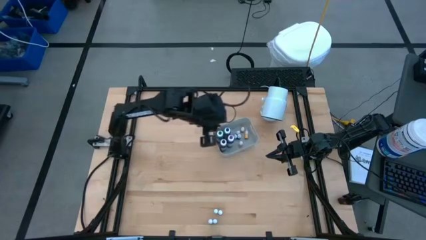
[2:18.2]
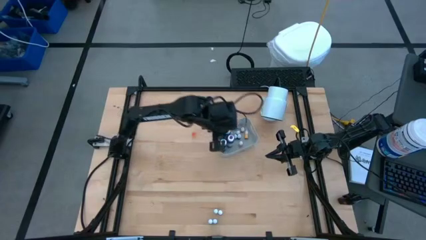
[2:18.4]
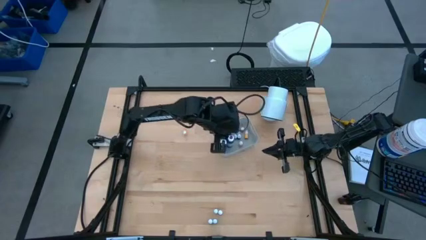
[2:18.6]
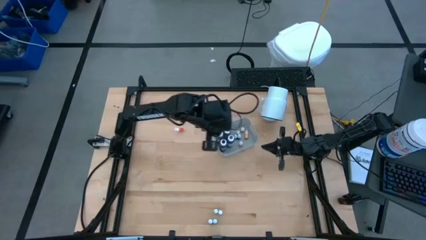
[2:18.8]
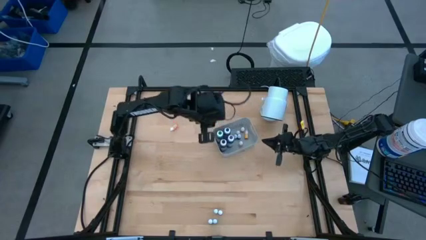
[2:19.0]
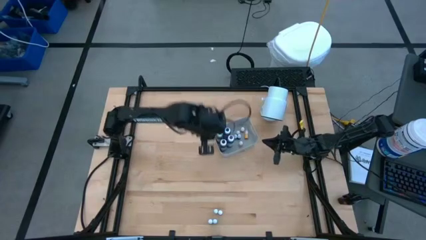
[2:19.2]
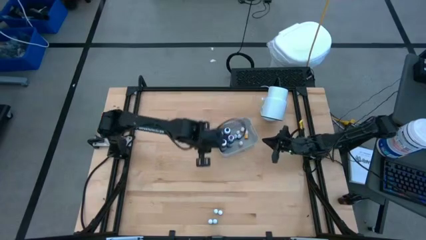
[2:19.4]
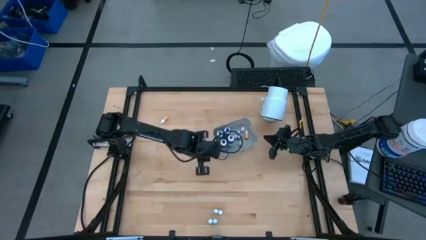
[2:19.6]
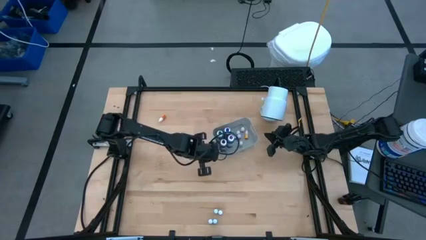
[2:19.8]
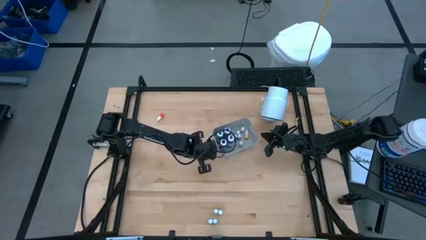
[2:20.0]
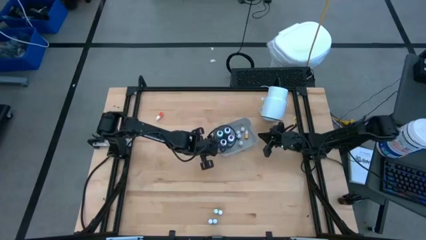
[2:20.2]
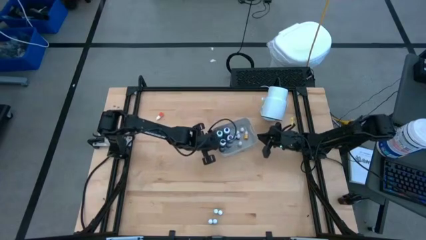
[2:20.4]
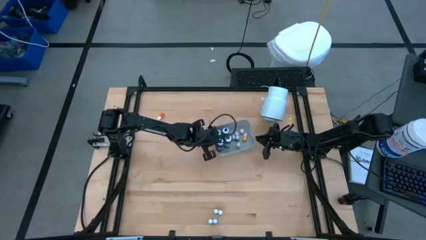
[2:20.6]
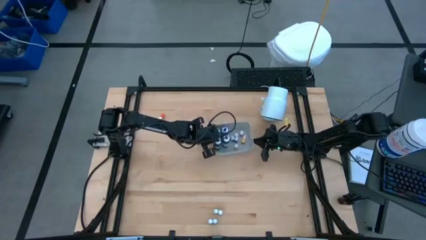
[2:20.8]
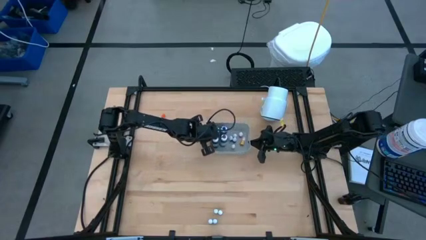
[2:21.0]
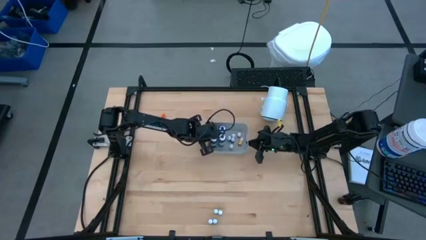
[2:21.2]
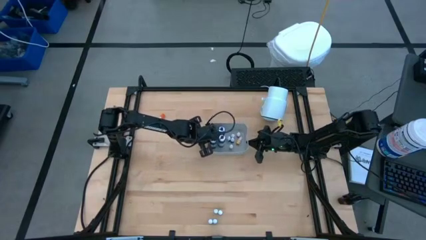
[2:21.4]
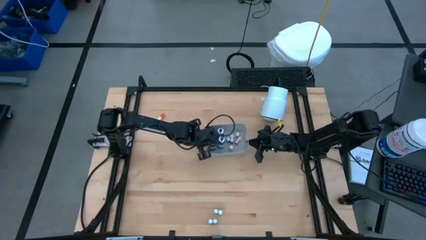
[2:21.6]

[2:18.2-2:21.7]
Task: Pick & Place food coloring
Adjust the gray bin

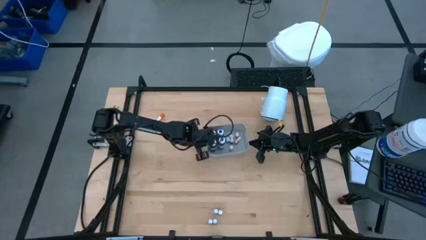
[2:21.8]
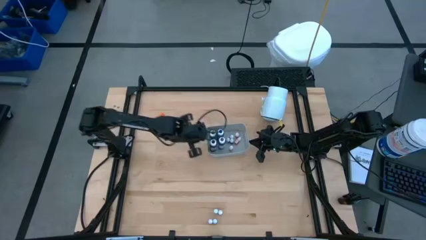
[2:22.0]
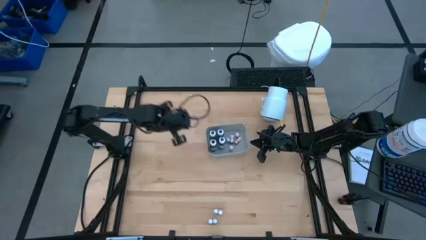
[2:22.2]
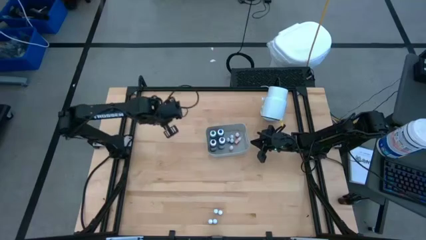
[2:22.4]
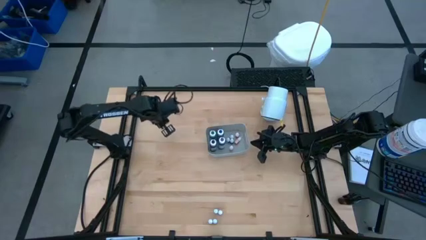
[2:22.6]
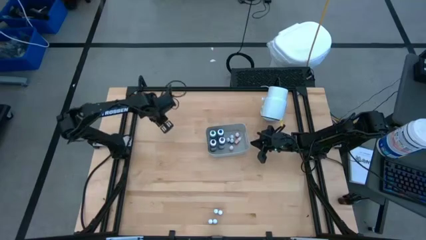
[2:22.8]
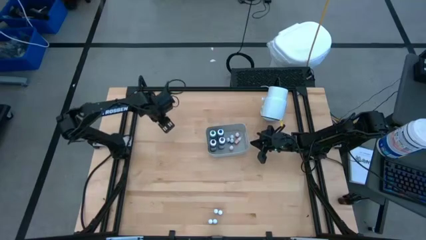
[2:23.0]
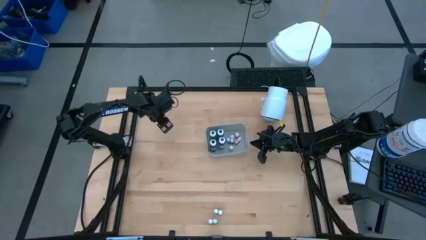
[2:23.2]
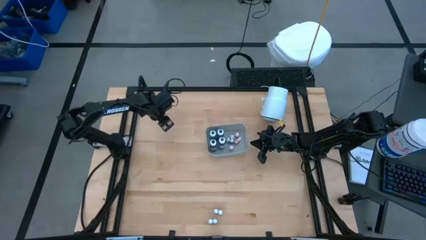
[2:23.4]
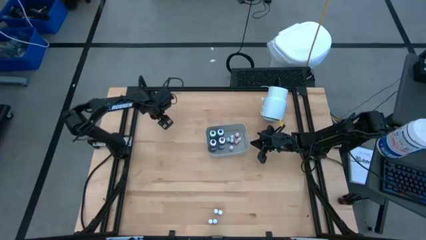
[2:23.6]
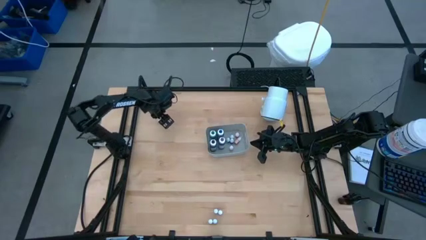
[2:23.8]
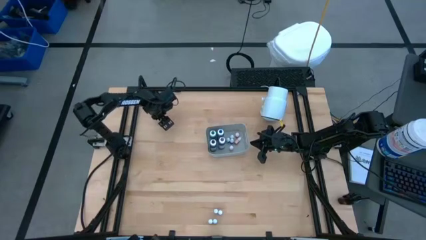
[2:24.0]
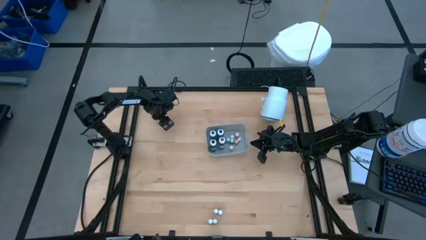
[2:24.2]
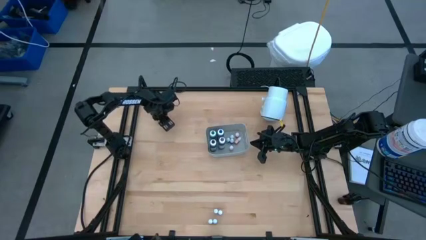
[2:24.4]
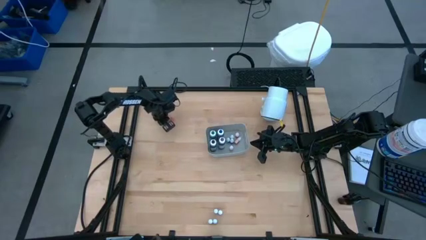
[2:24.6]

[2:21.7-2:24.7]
Put the small yellow food coloring bottle into the gray bin

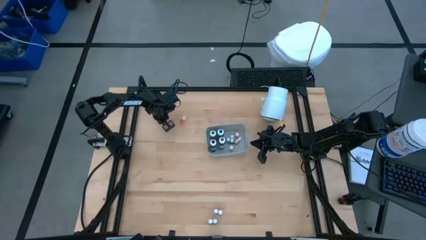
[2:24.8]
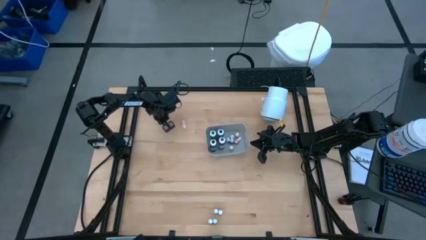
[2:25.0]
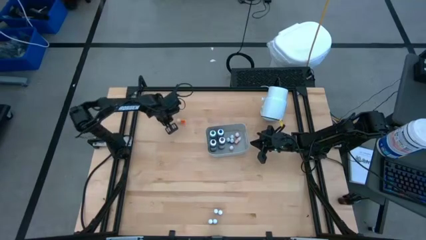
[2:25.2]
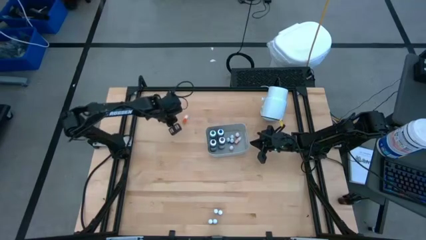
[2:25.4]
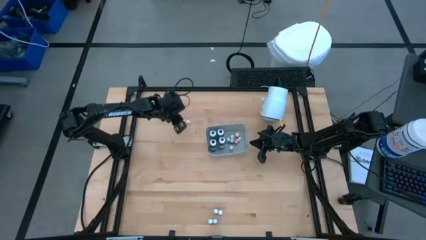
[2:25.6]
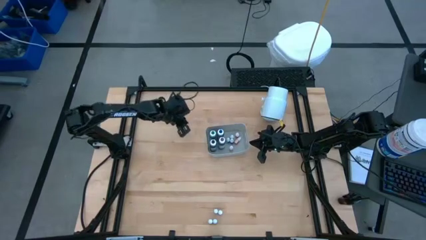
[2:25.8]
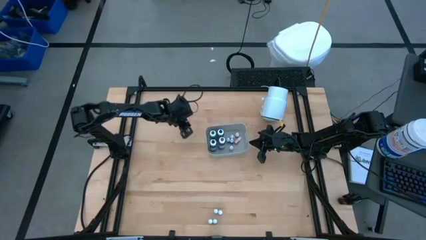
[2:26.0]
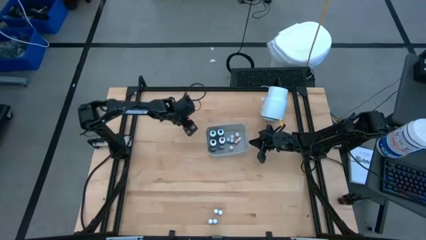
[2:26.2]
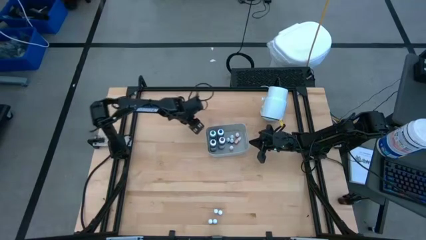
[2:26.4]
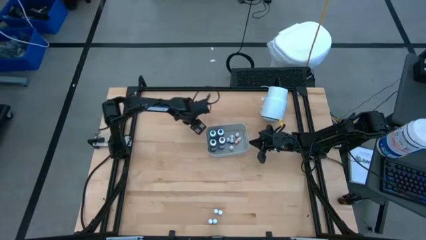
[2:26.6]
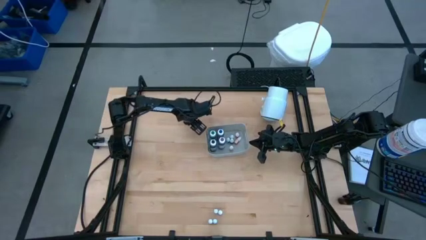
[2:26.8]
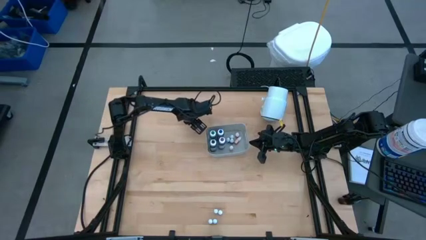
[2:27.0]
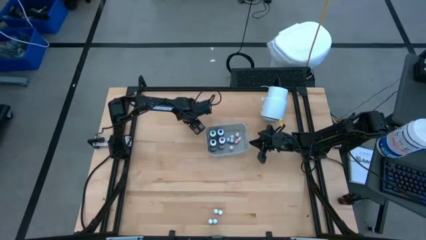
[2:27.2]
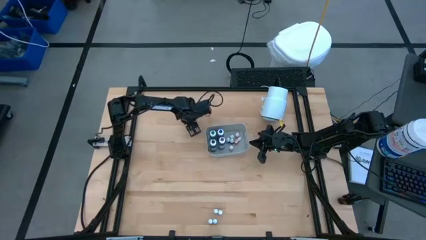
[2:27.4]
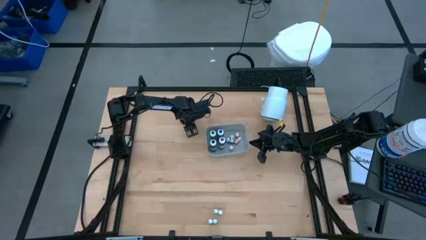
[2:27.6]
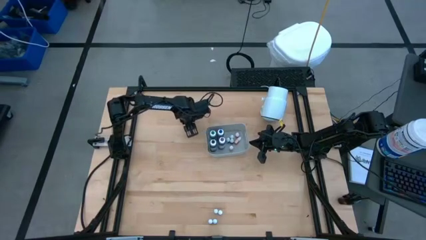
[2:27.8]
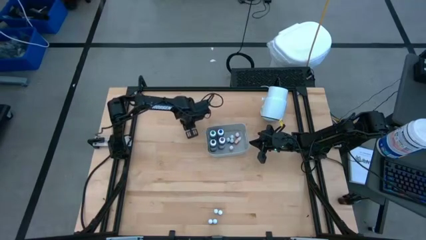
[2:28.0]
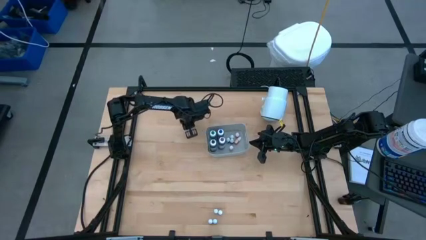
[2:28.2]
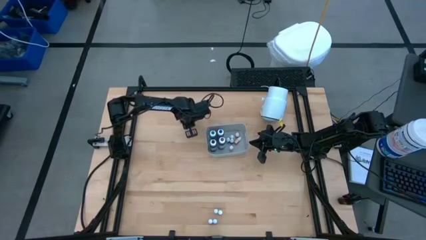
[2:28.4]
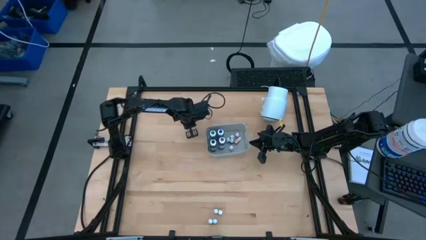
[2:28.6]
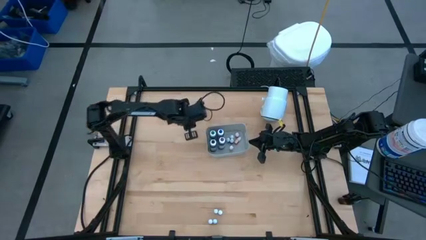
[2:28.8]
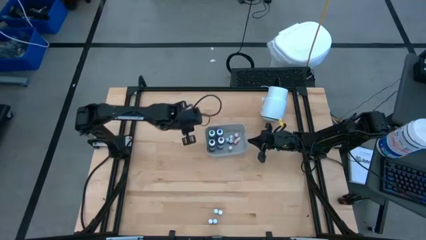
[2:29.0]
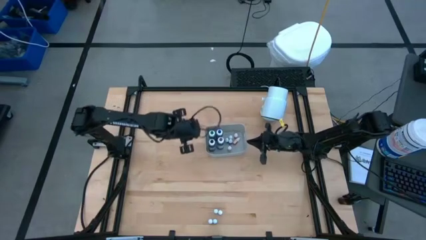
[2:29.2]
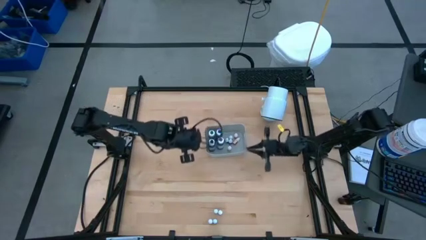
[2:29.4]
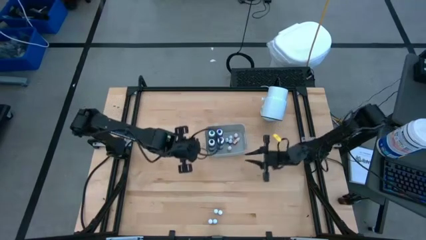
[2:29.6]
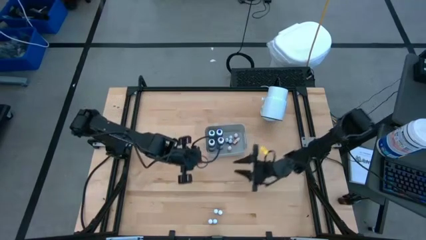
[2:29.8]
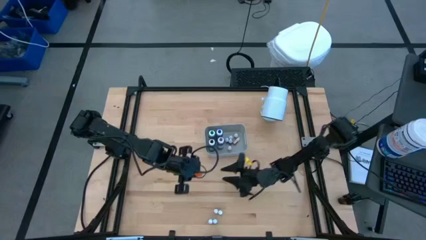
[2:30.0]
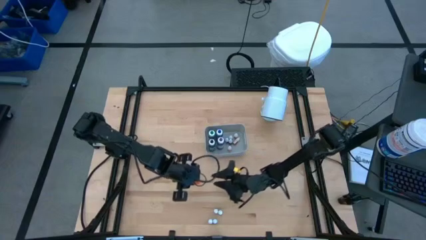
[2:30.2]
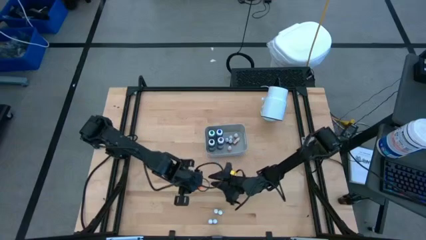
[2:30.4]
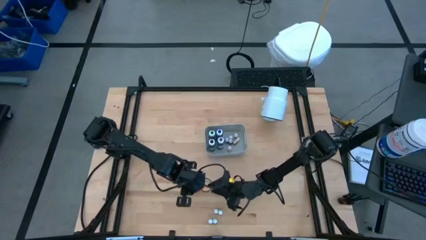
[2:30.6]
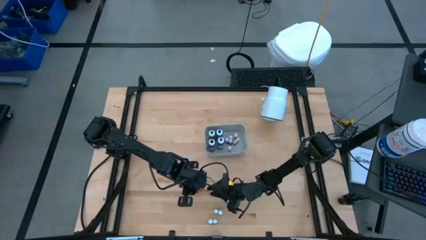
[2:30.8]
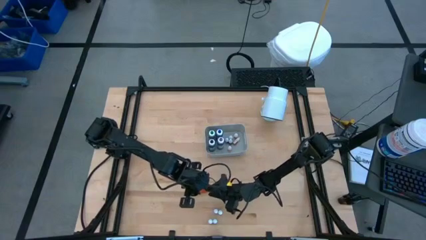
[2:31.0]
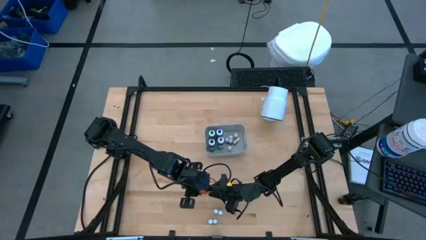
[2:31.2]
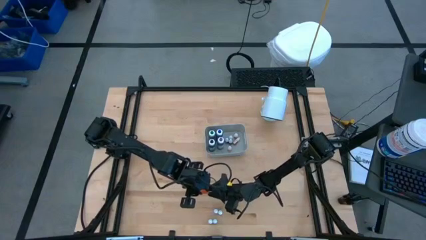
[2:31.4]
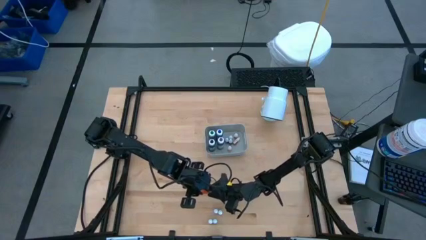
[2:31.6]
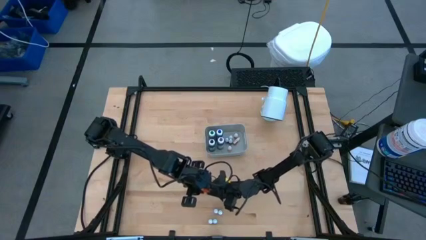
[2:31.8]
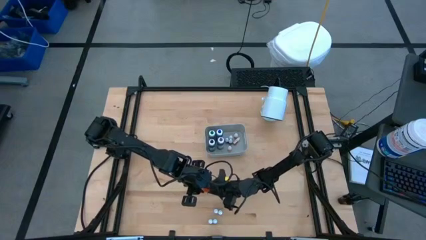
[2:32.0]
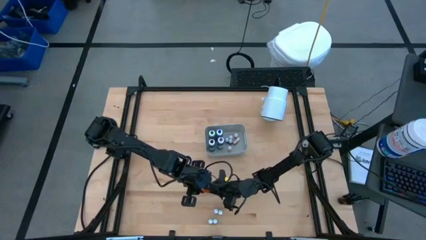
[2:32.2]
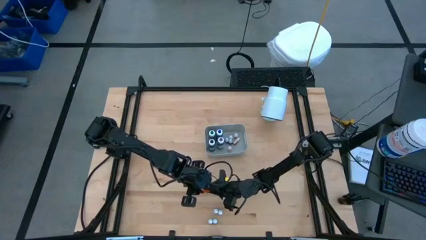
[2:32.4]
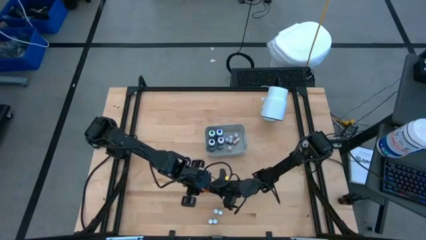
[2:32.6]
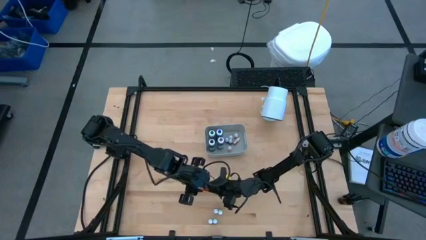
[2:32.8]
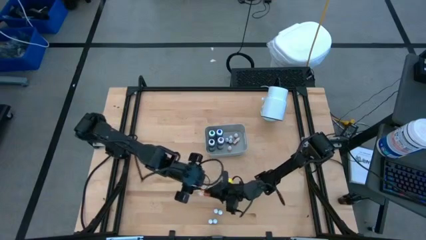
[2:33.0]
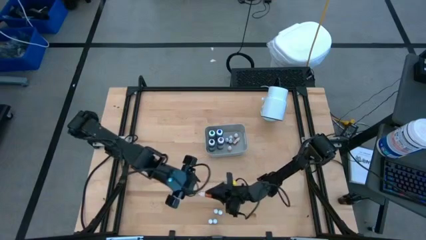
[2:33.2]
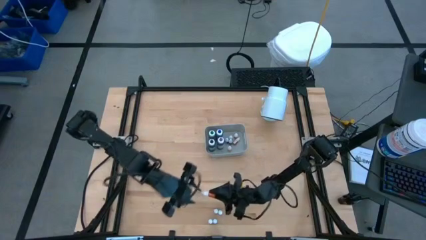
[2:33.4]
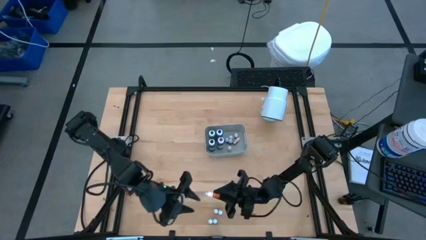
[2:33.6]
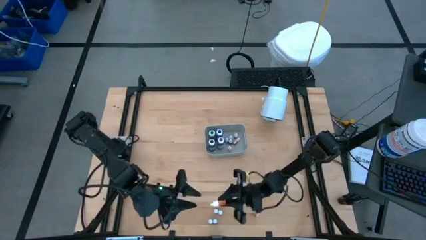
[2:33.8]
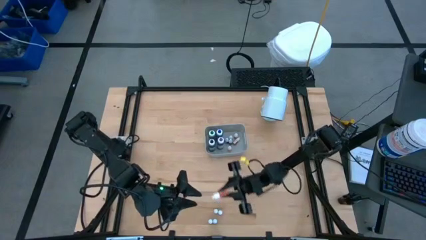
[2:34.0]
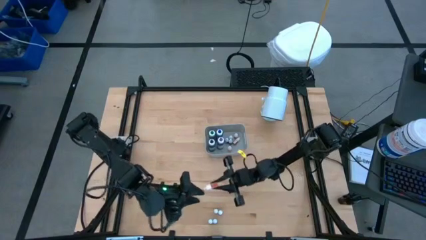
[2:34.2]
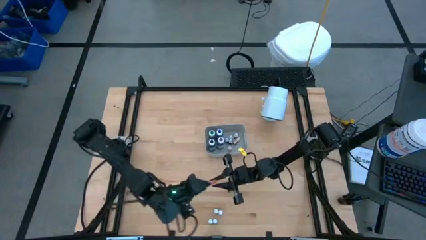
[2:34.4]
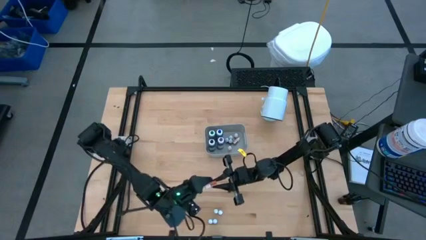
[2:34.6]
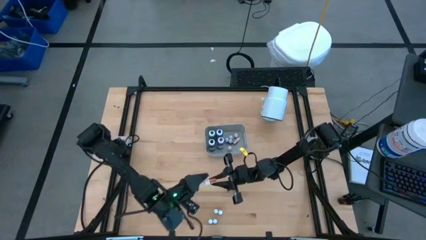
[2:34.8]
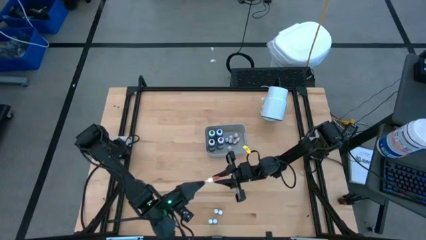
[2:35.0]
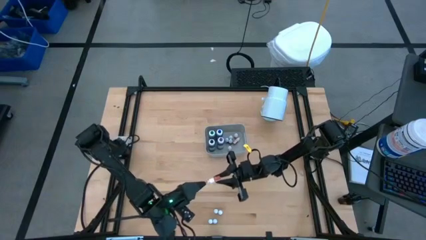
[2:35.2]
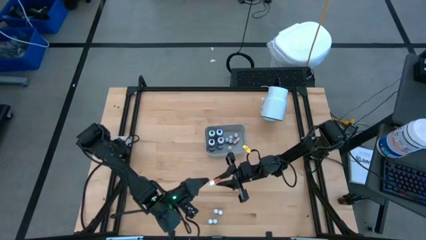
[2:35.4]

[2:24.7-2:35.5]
Put the small yellow food coloring bottle into the gray bin
